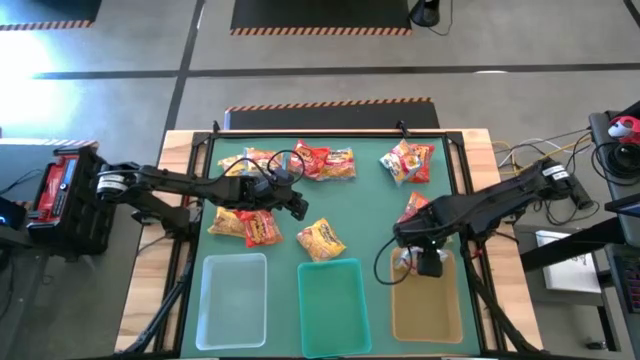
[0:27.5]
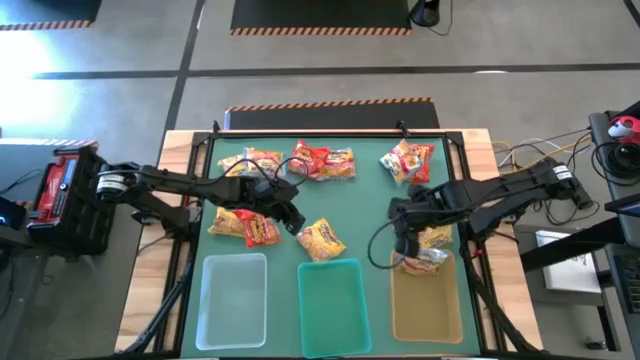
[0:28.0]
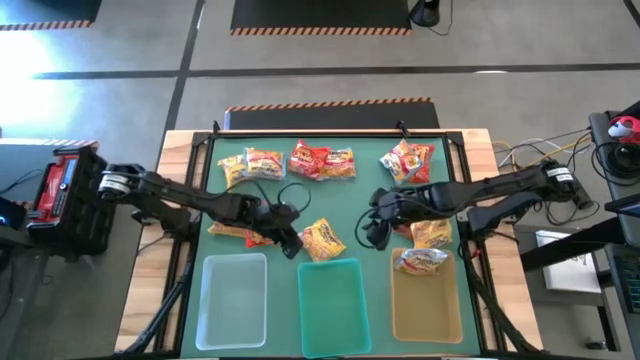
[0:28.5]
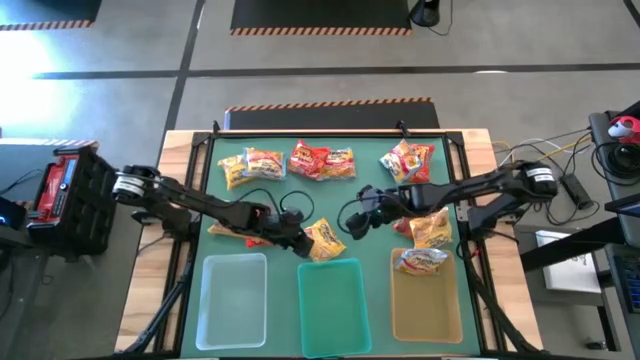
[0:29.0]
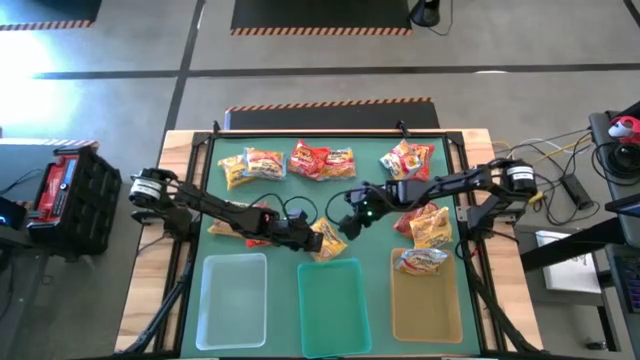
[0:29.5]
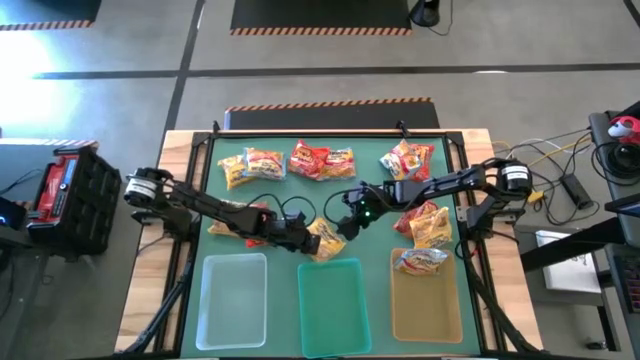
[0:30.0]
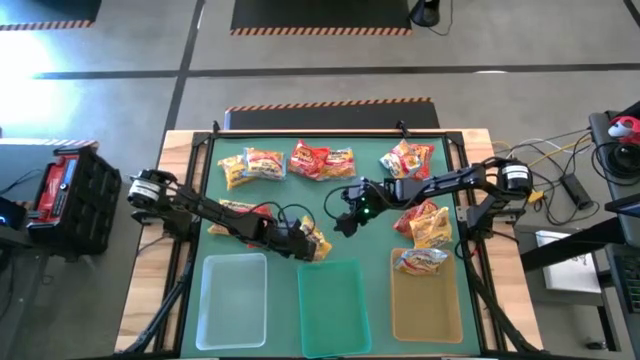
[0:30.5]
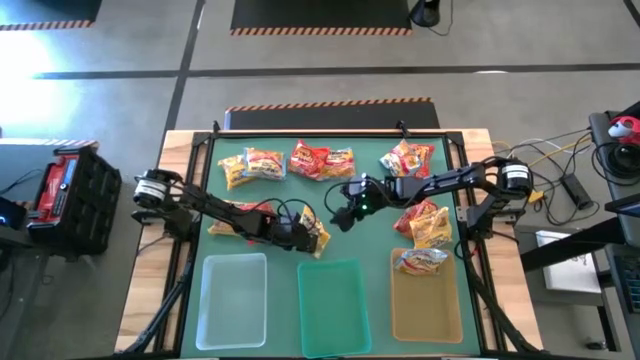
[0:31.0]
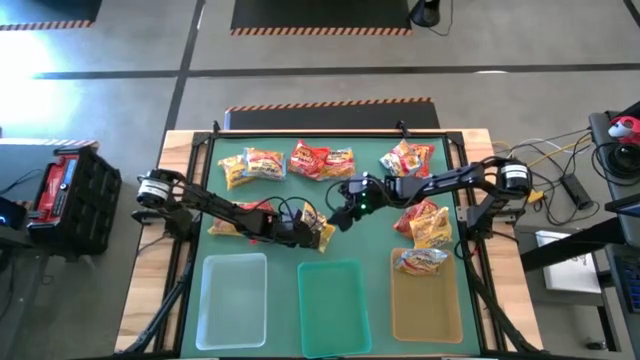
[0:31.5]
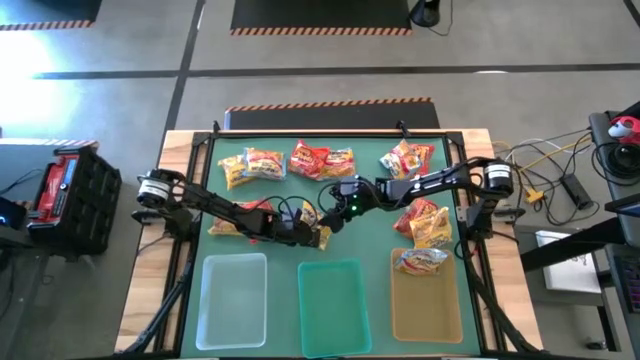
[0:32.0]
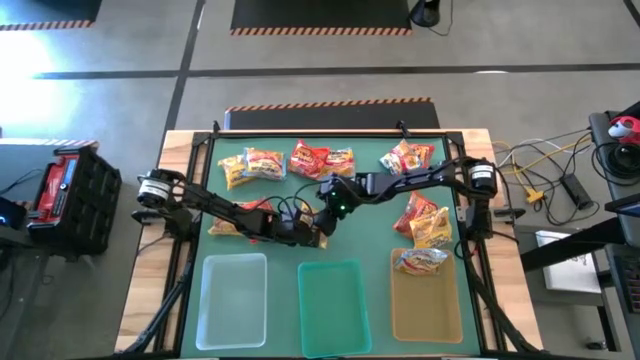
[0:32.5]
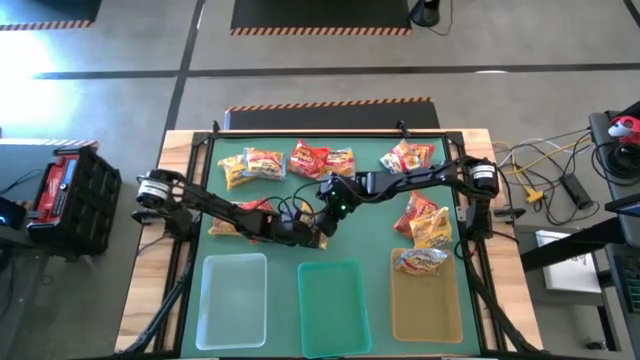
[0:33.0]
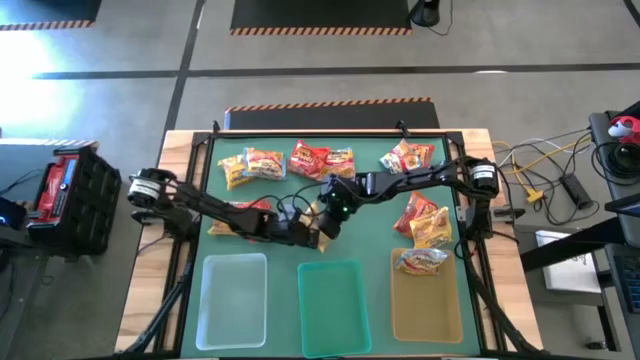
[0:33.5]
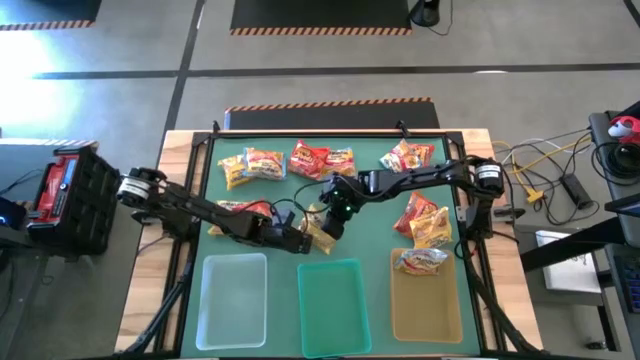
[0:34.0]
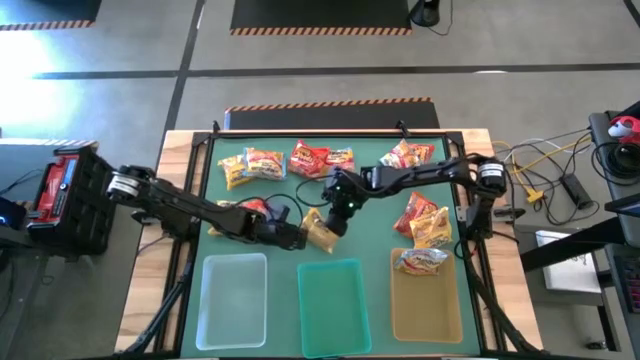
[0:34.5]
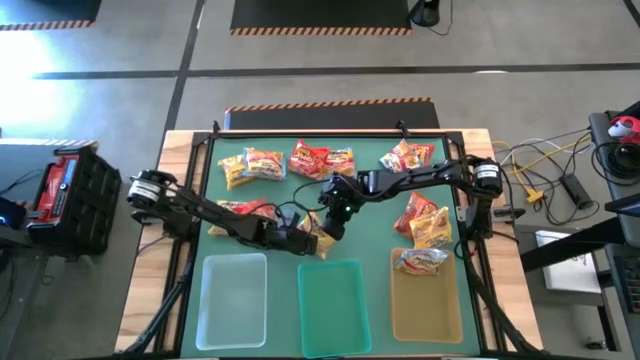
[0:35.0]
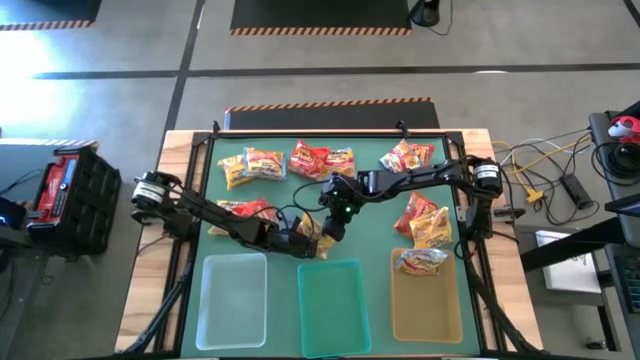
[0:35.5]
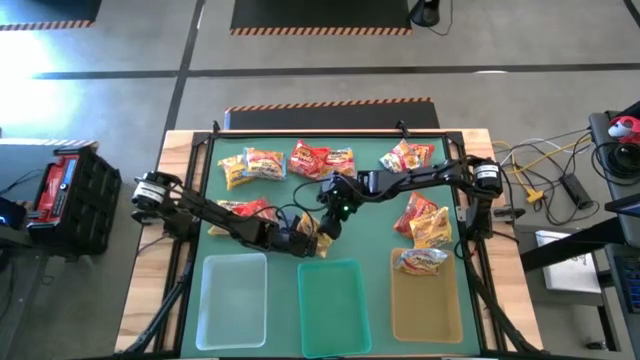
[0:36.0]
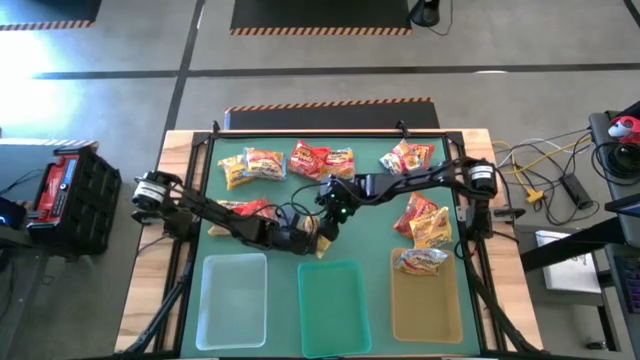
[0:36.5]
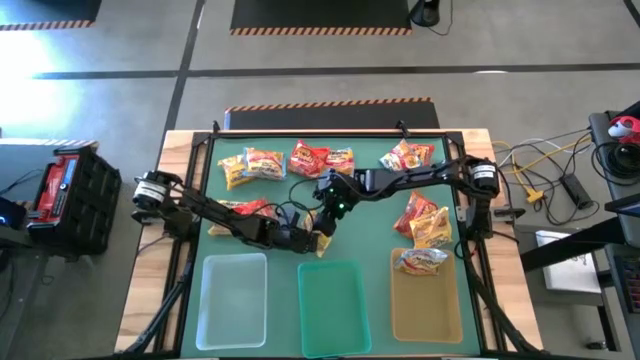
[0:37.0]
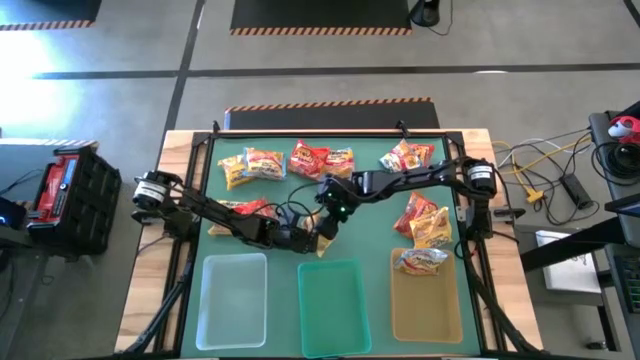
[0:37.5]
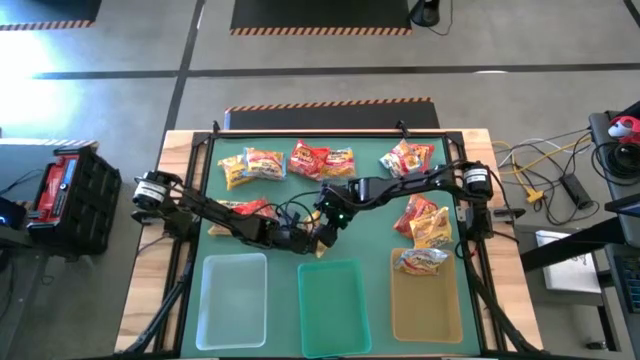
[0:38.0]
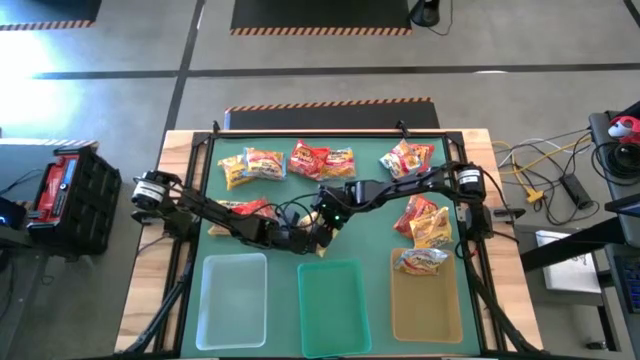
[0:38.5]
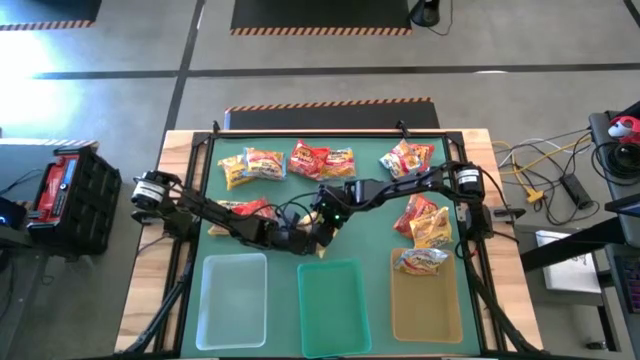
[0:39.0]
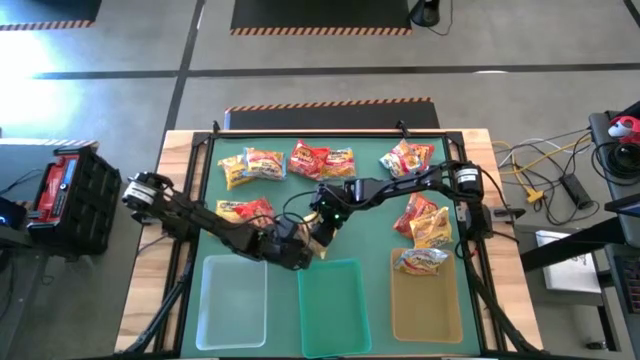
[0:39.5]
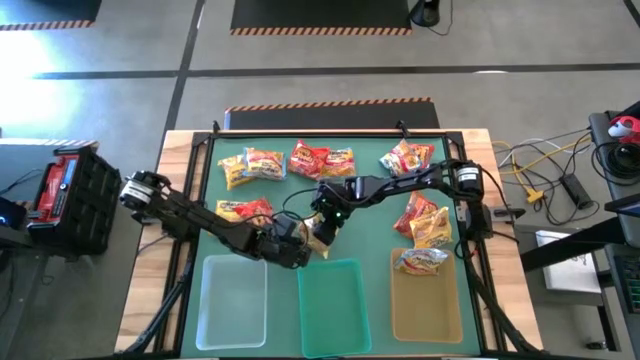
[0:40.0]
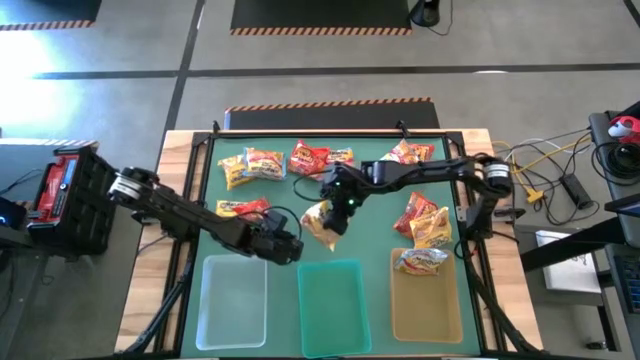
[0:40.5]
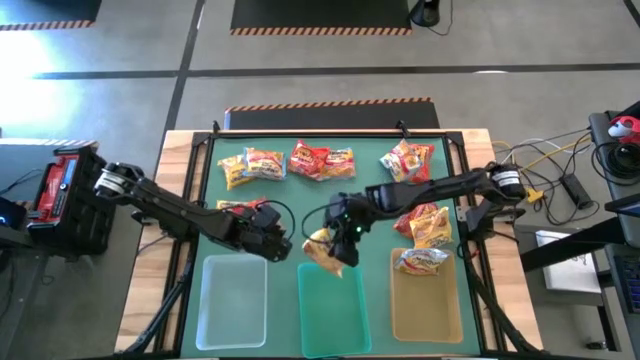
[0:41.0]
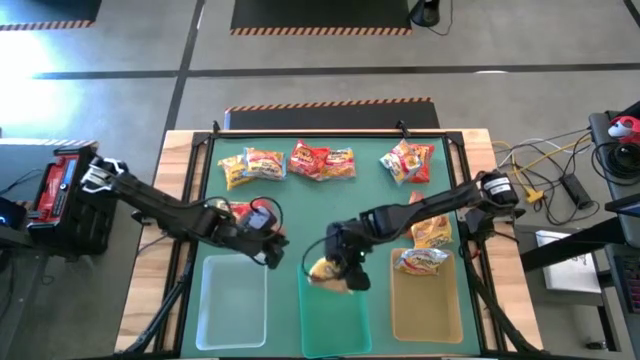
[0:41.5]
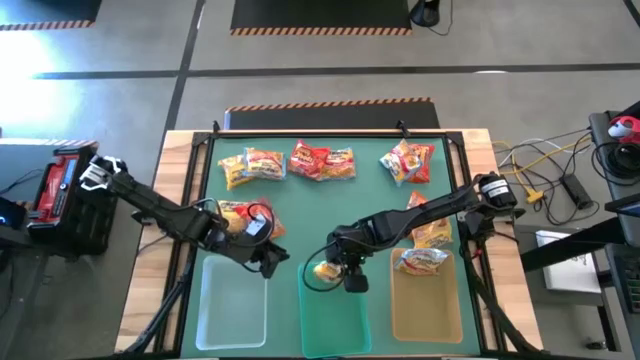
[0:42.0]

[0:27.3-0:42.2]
Task: Sort Maruchan noodles
Put the yellow noodle pack into the green bin

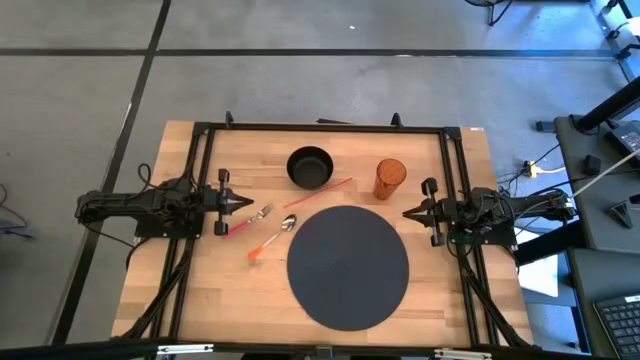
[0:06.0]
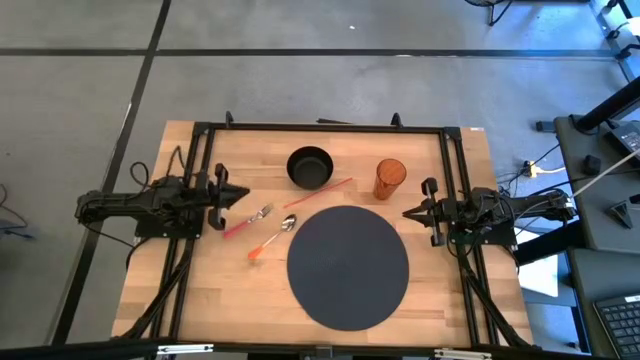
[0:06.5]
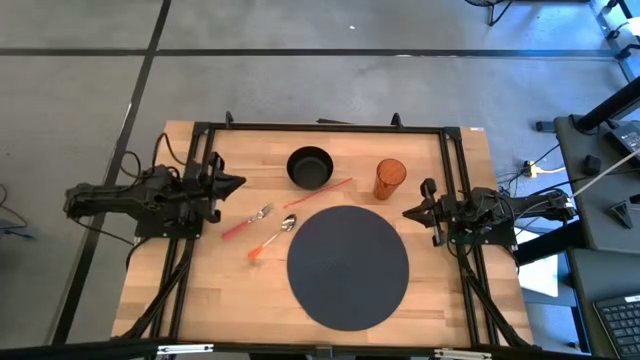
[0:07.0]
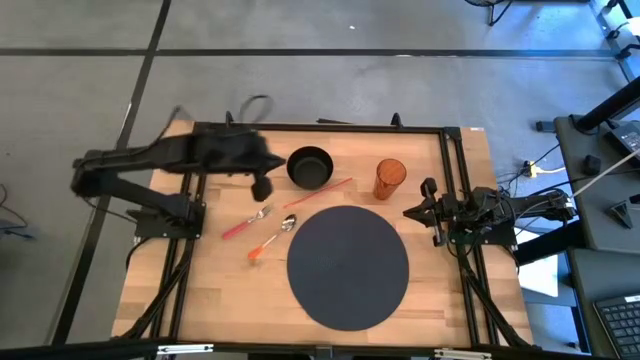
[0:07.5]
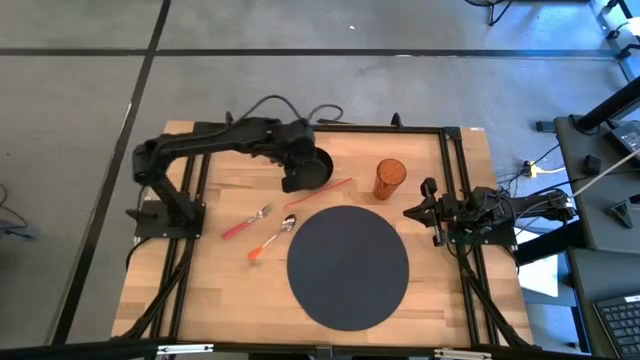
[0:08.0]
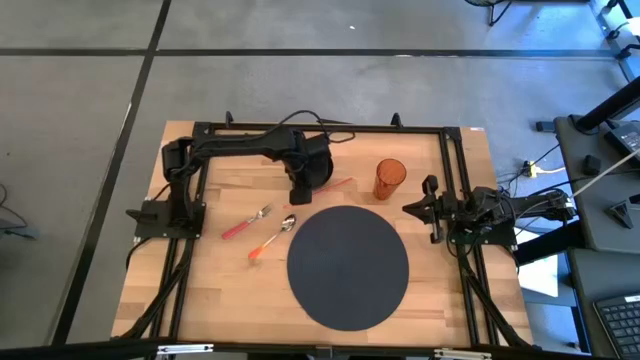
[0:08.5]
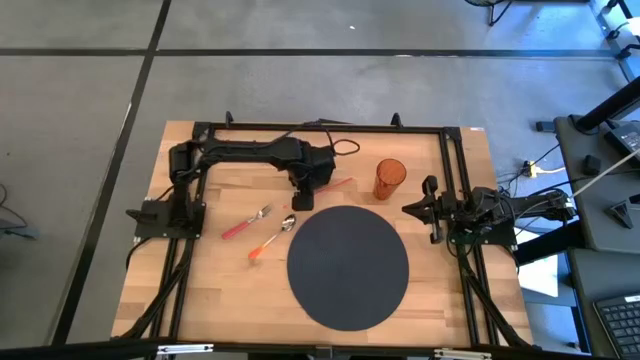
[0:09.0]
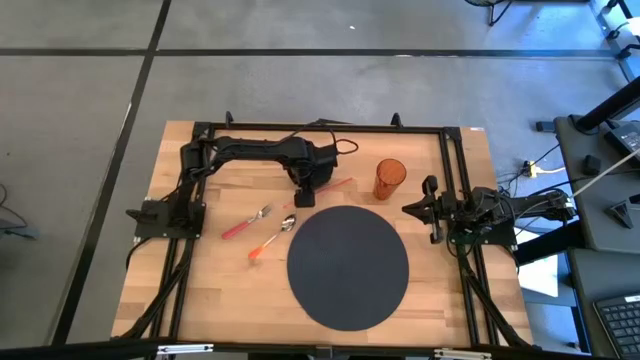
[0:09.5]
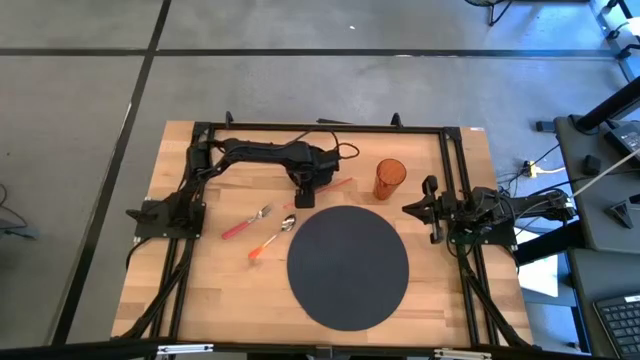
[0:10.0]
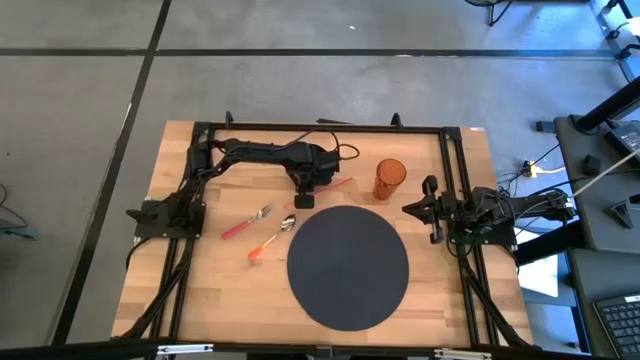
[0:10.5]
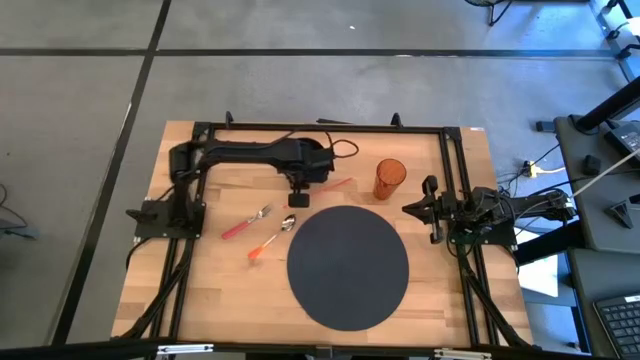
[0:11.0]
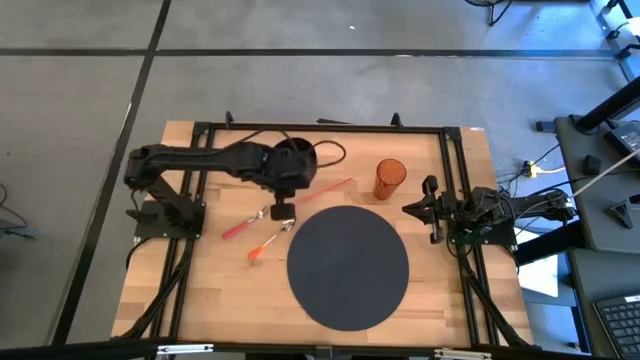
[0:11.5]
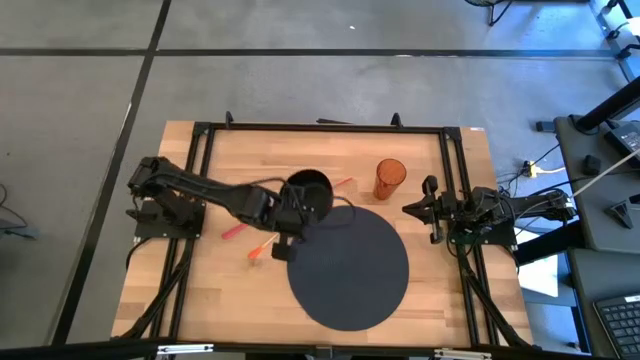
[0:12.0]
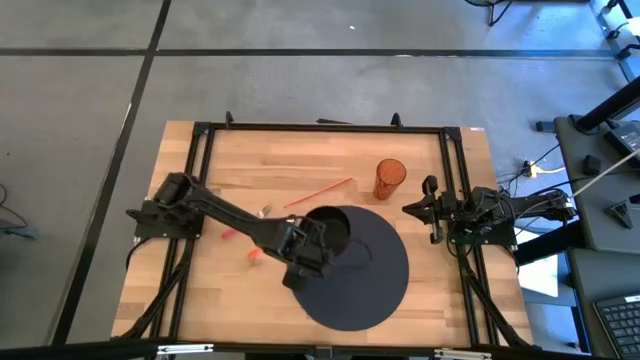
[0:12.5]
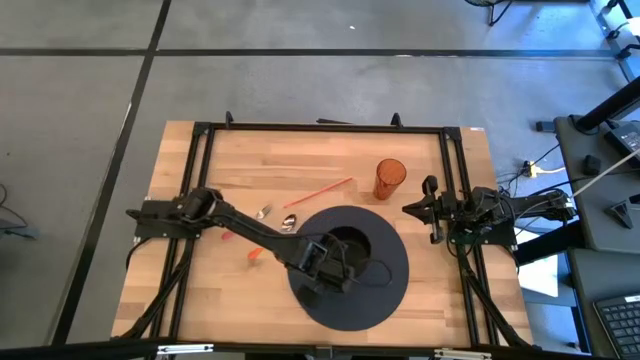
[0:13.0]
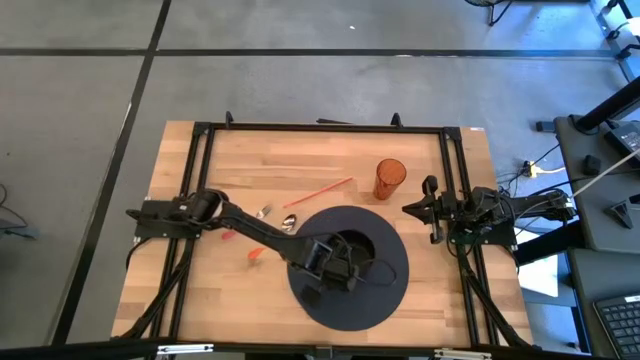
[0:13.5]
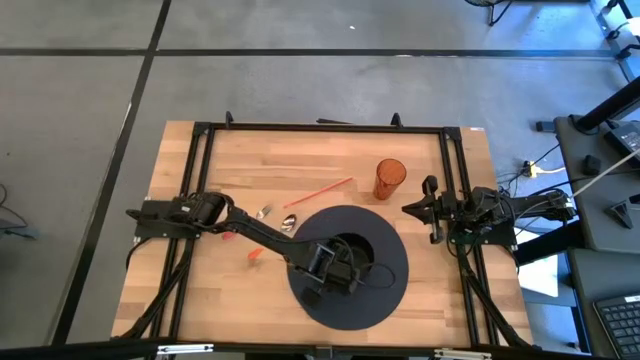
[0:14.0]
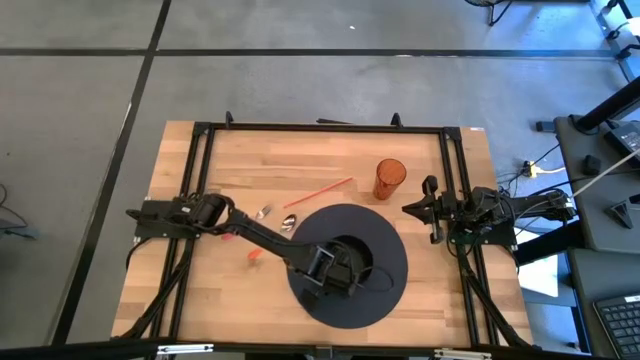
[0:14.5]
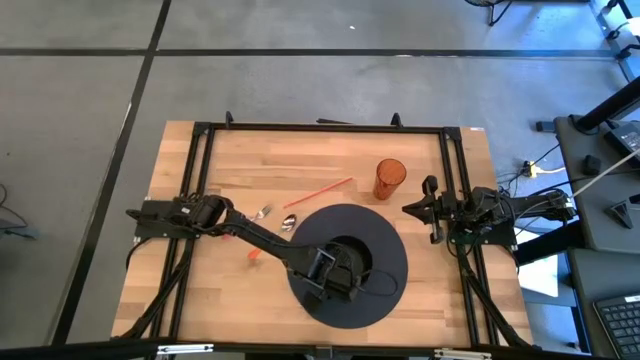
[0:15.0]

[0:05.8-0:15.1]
Task: Pick & Place Utensil
Put the black bowl on the black mat
